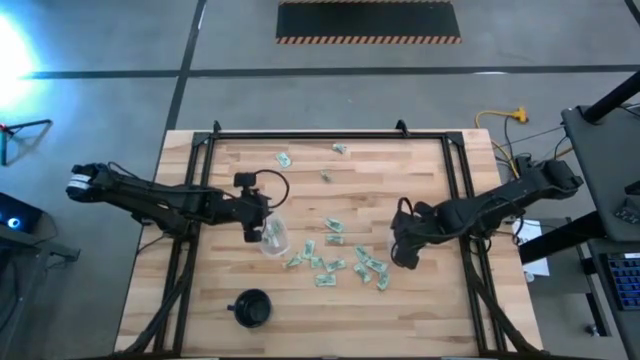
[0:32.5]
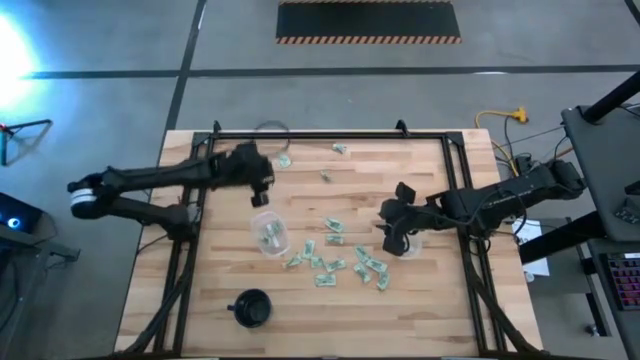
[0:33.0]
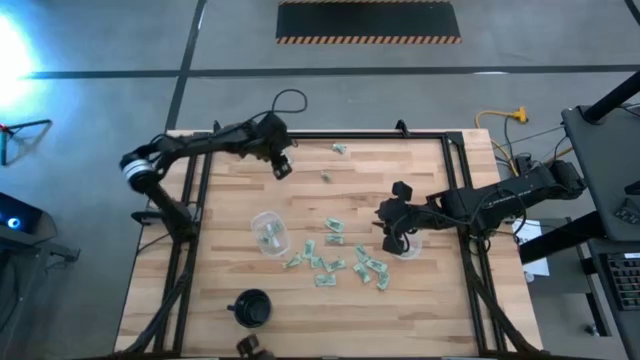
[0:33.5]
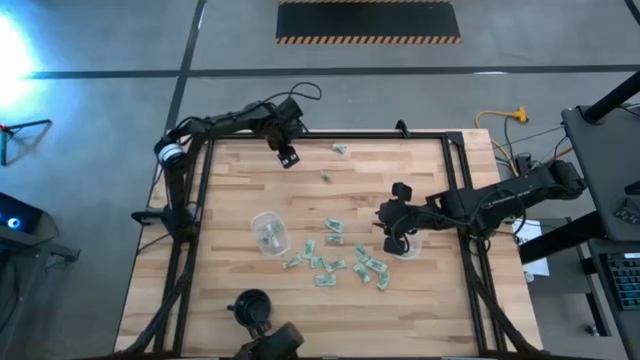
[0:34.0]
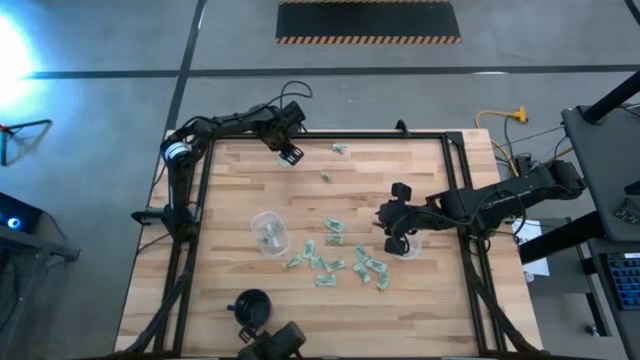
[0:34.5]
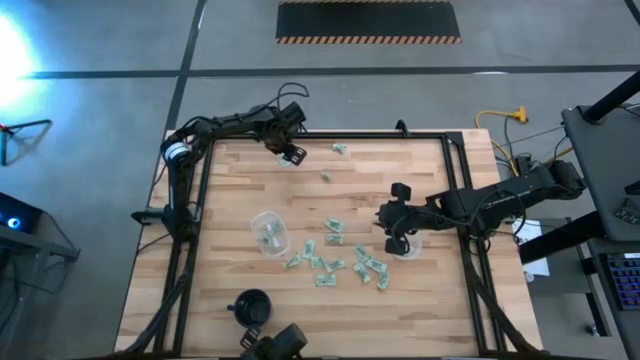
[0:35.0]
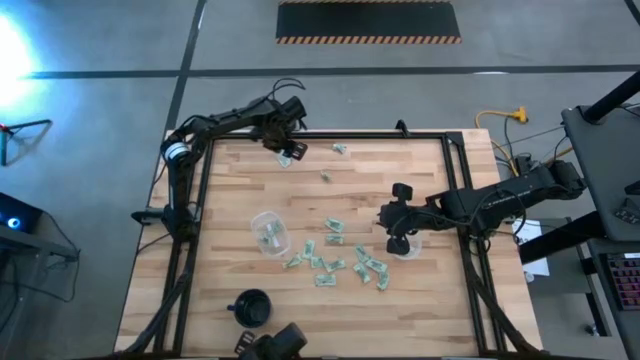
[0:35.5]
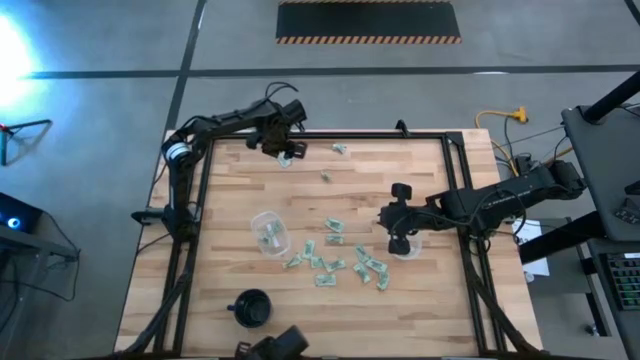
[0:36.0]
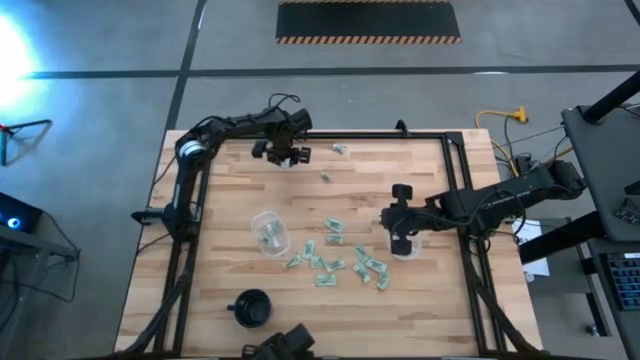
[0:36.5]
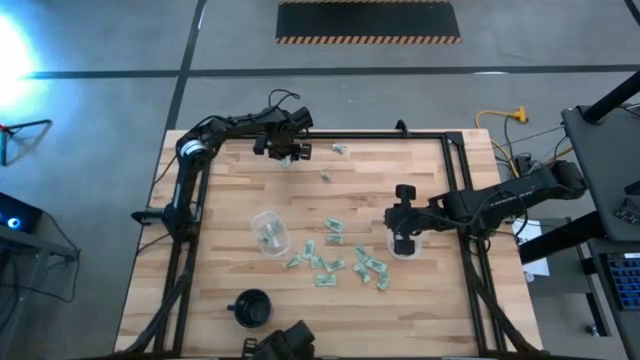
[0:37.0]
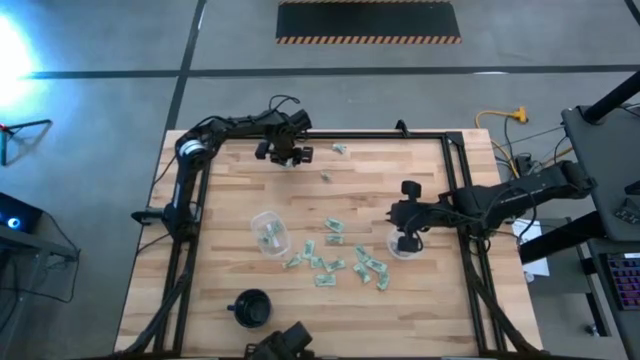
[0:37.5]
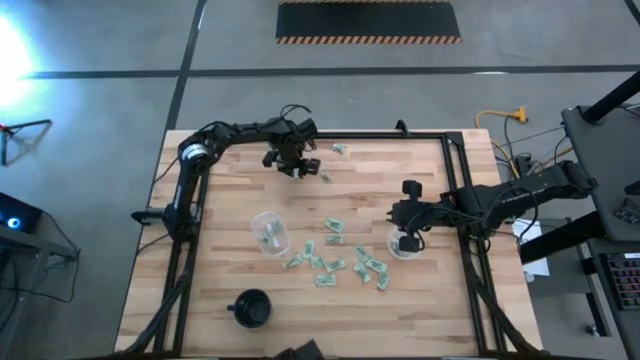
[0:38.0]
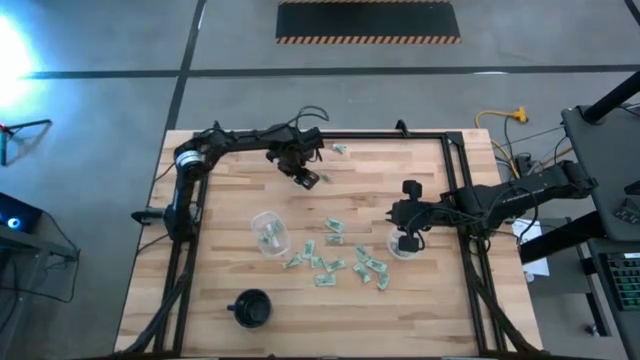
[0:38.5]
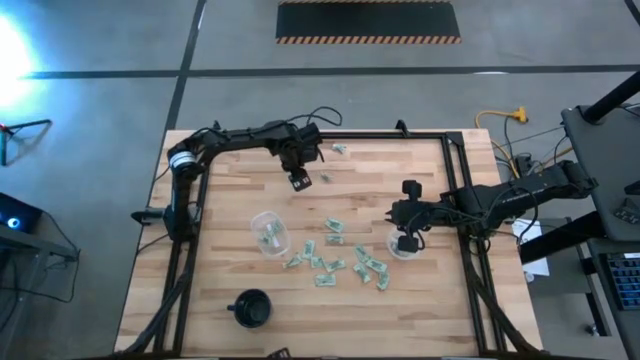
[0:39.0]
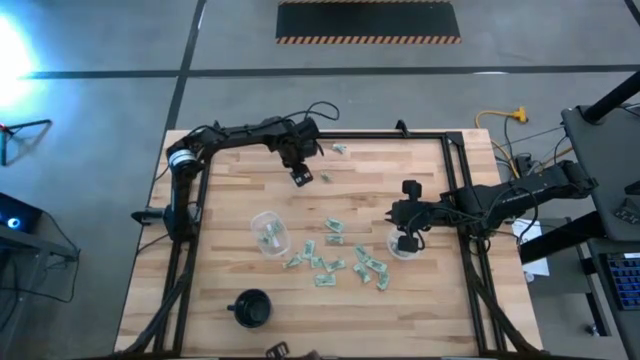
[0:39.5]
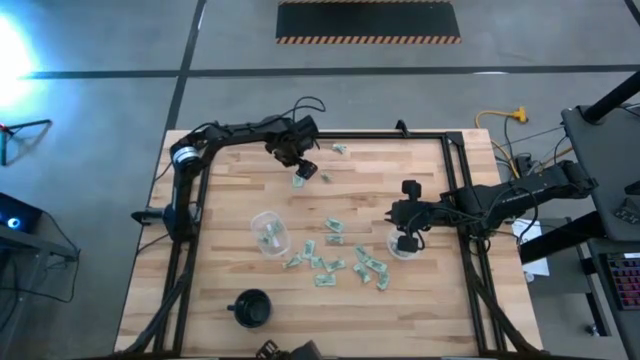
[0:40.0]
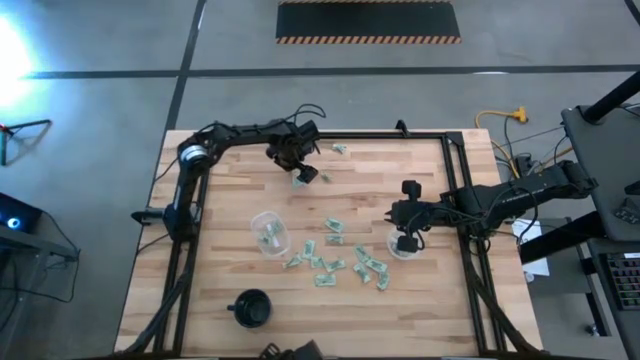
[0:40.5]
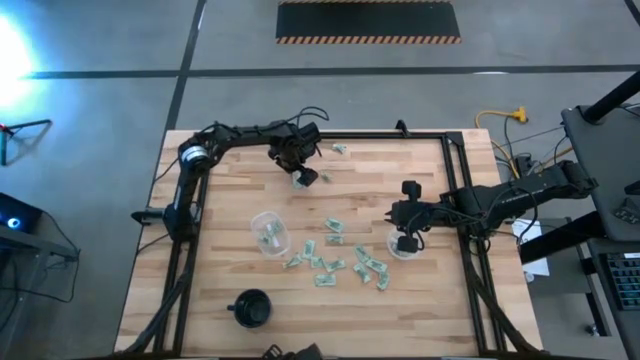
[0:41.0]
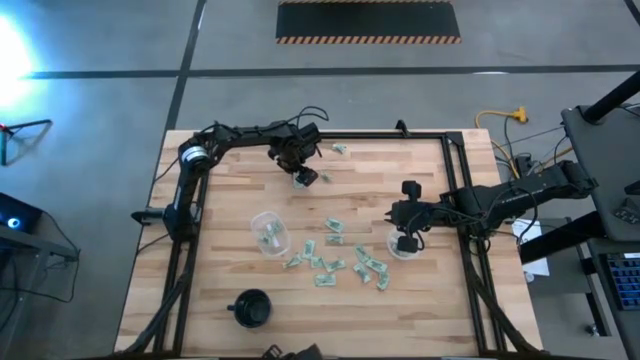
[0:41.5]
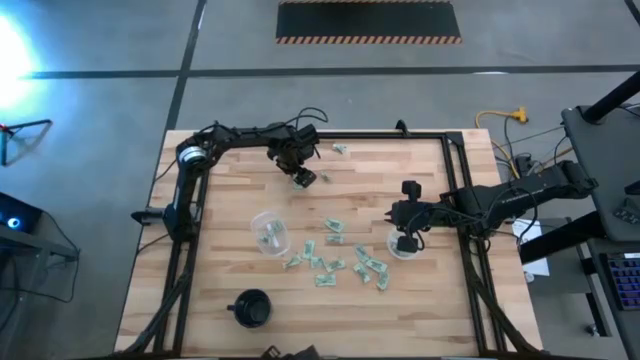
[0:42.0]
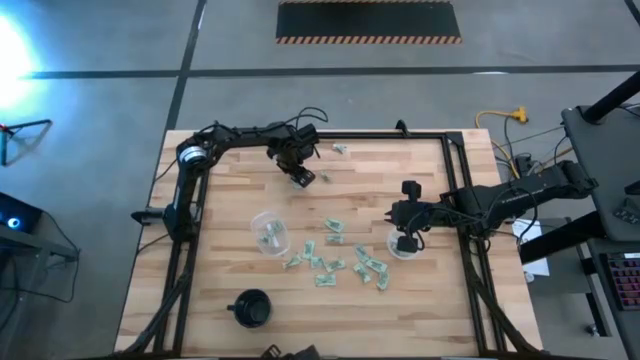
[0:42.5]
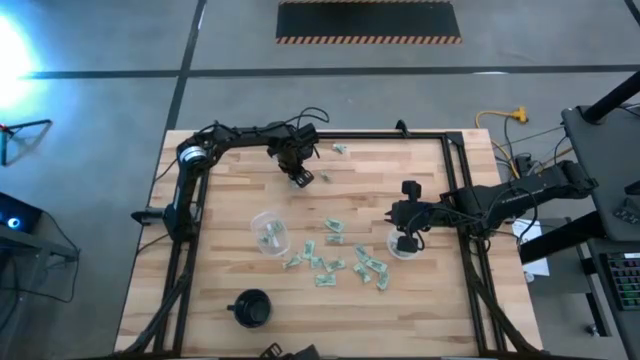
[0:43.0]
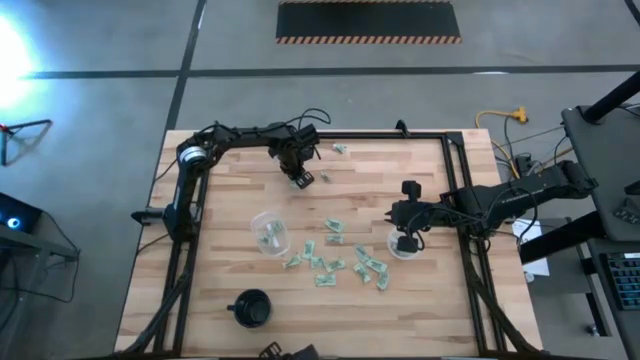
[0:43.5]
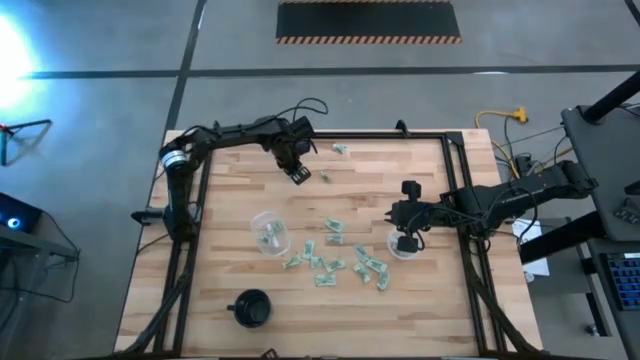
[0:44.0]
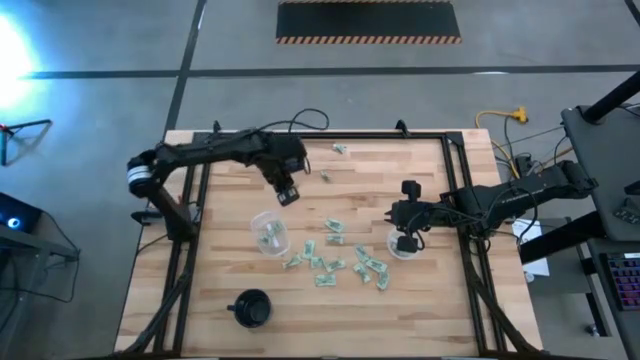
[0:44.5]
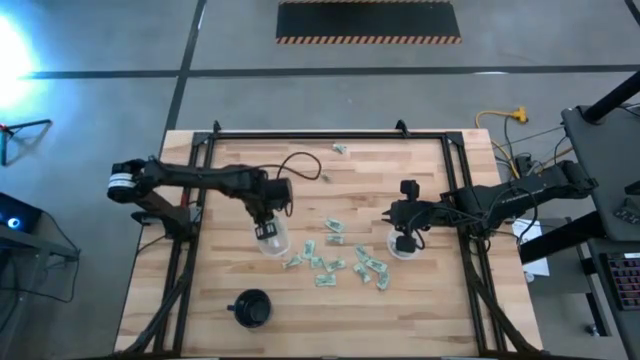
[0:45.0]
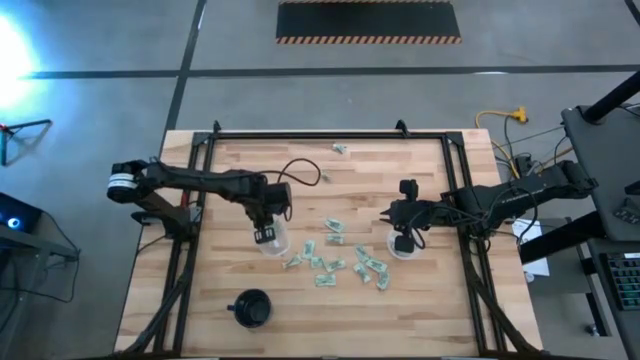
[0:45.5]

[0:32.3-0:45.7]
Task: Pick and place Stevia / Truvia into bins
Put the stevia packet into the oval transparent container

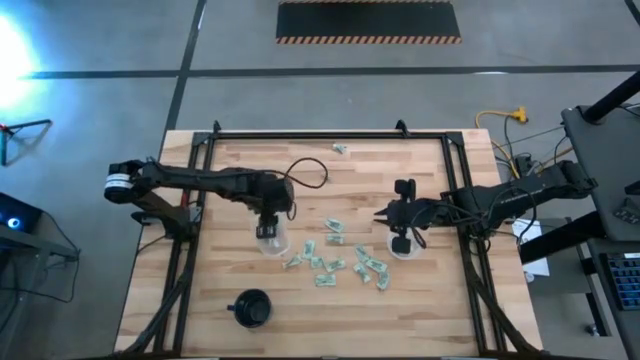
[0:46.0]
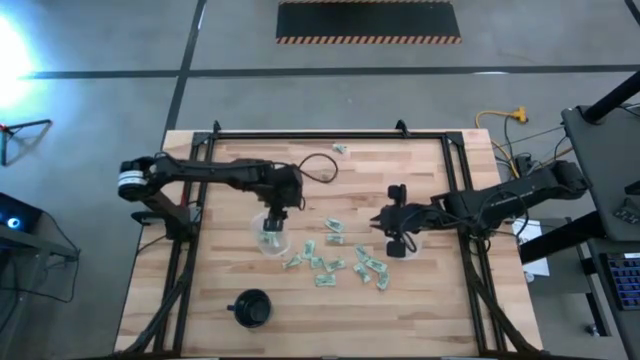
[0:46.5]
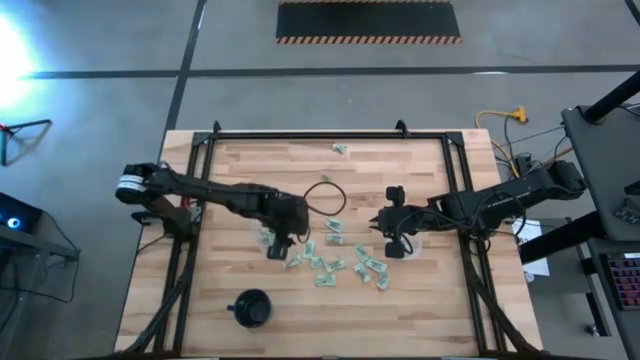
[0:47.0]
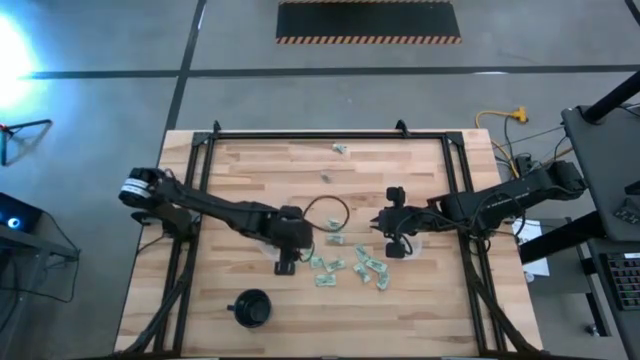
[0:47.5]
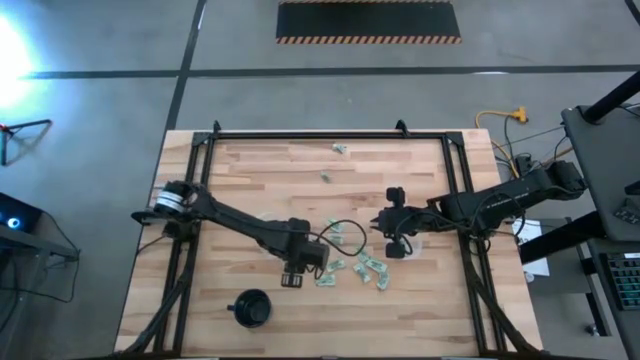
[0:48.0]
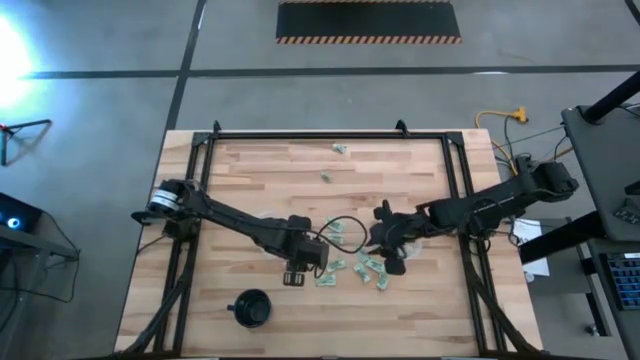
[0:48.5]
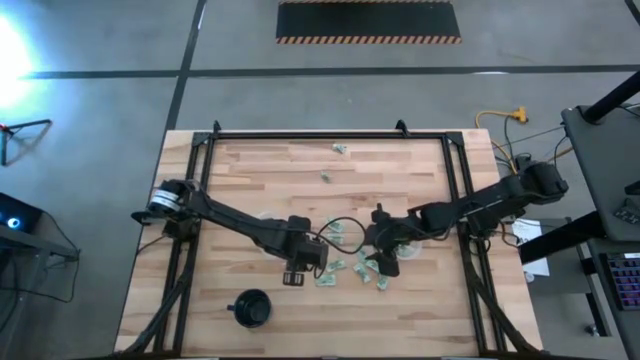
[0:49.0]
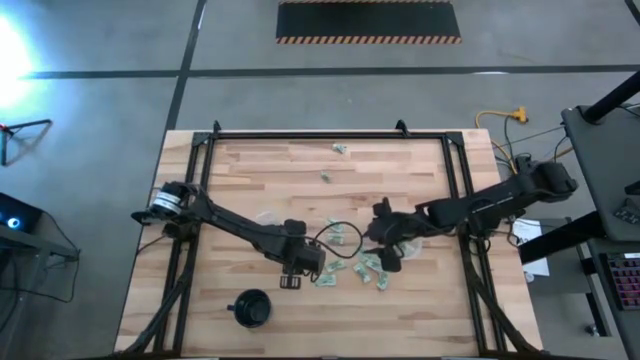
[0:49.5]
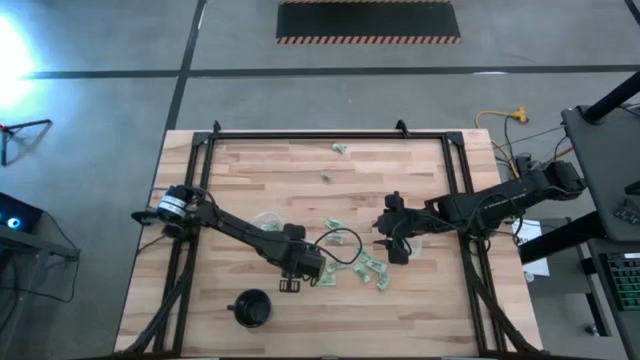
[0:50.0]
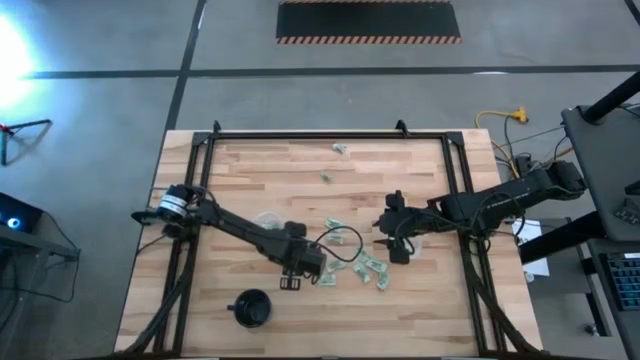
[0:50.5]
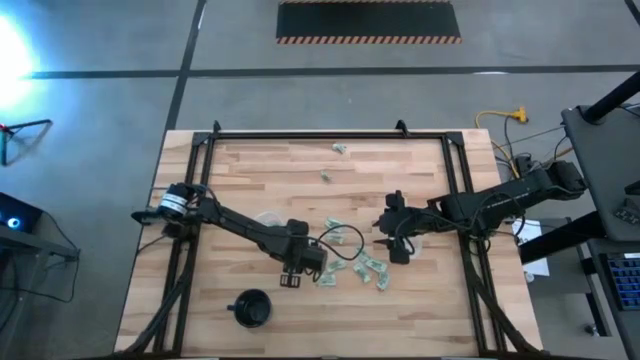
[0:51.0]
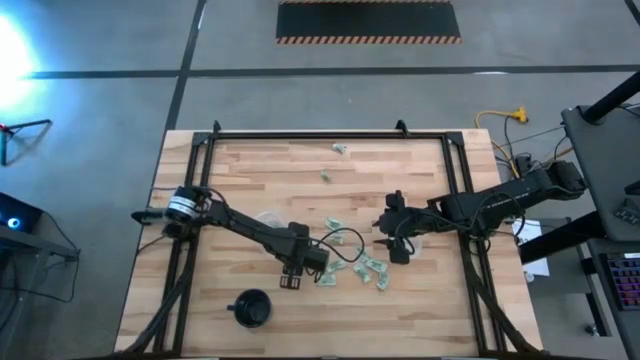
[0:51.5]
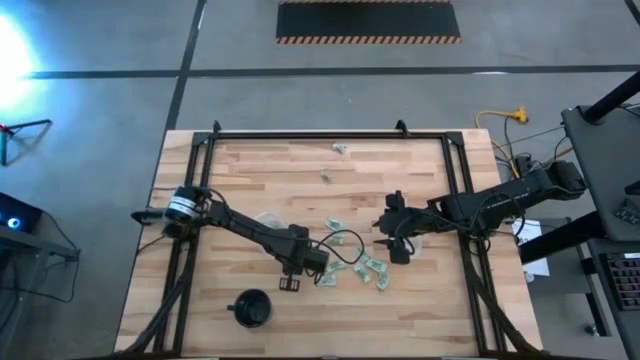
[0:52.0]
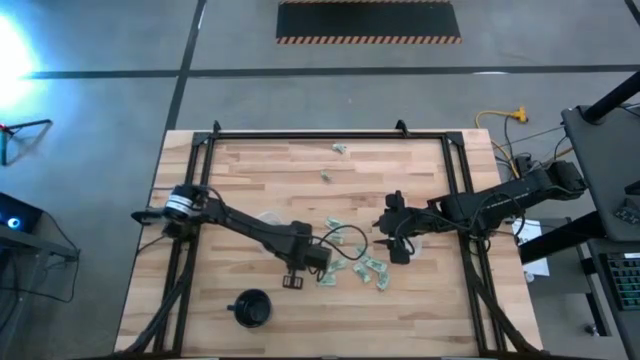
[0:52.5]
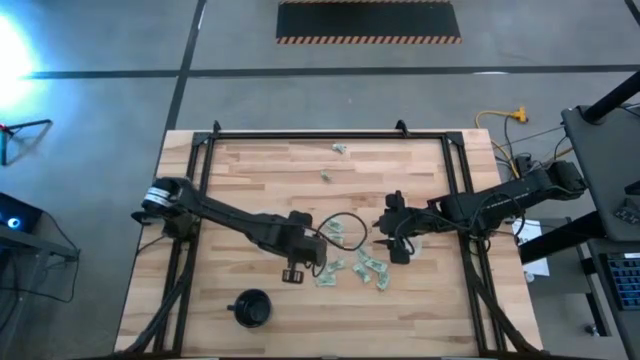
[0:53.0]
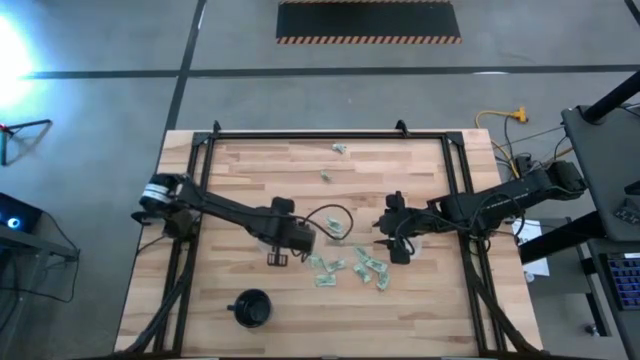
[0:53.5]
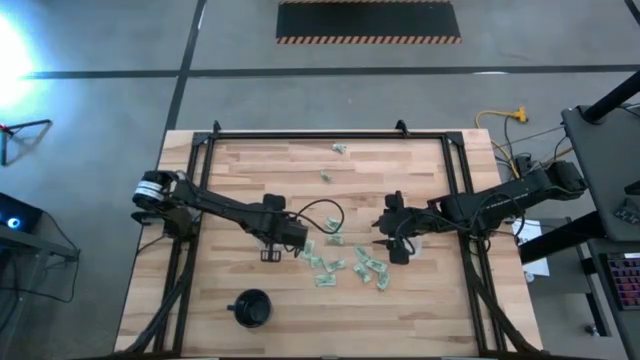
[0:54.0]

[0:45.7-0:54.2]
Put the stevia packet into the oval transparent container
